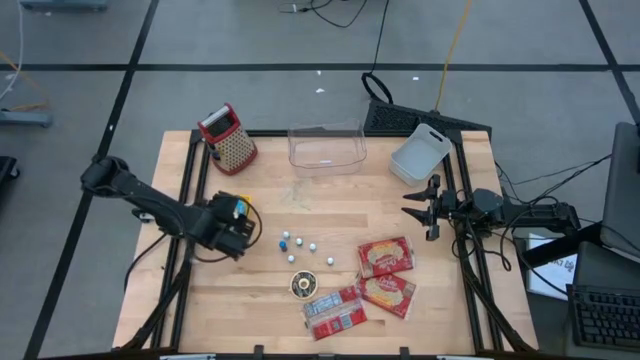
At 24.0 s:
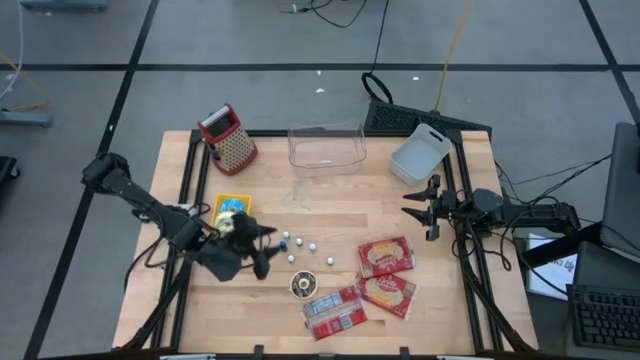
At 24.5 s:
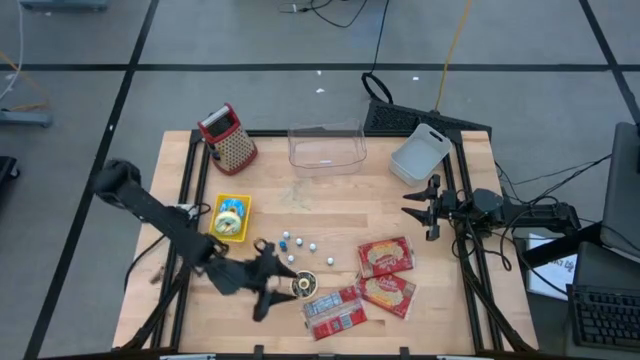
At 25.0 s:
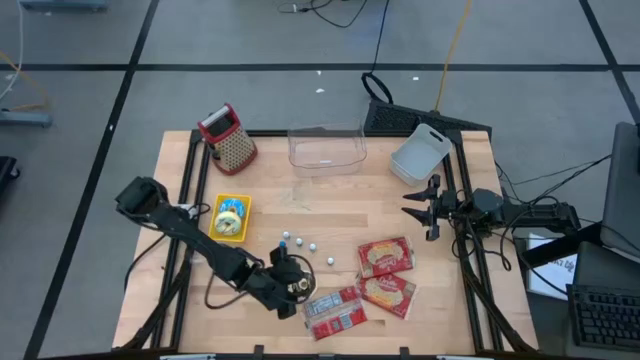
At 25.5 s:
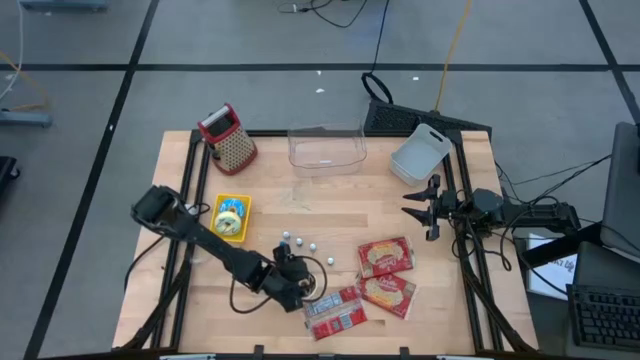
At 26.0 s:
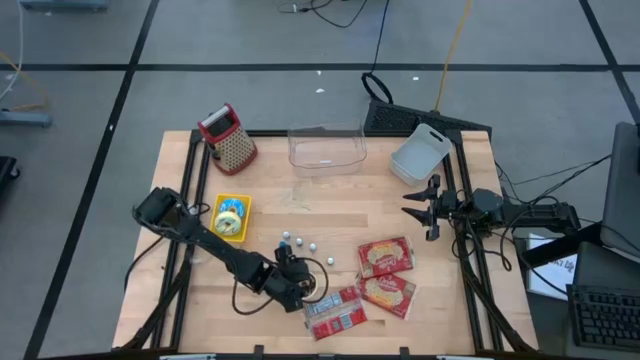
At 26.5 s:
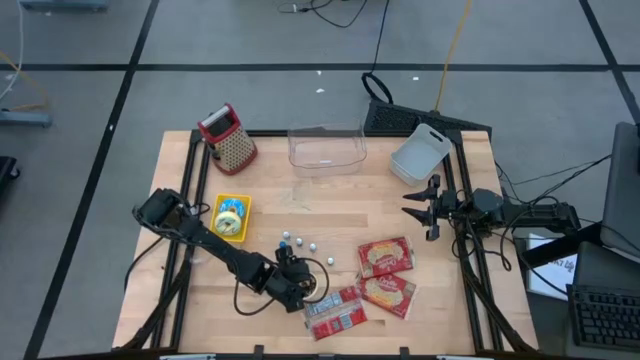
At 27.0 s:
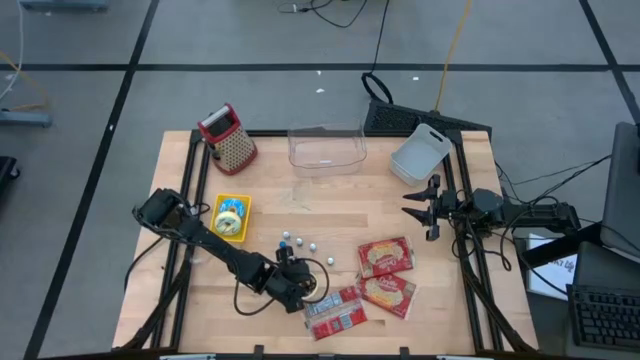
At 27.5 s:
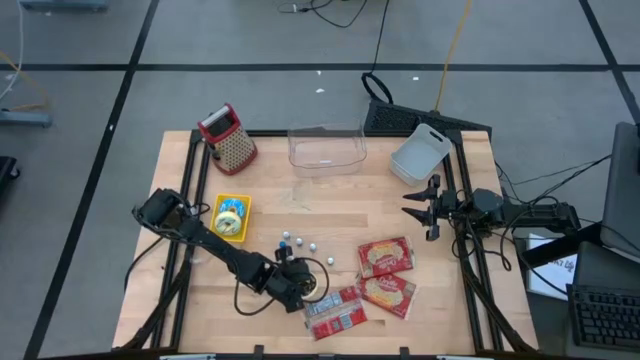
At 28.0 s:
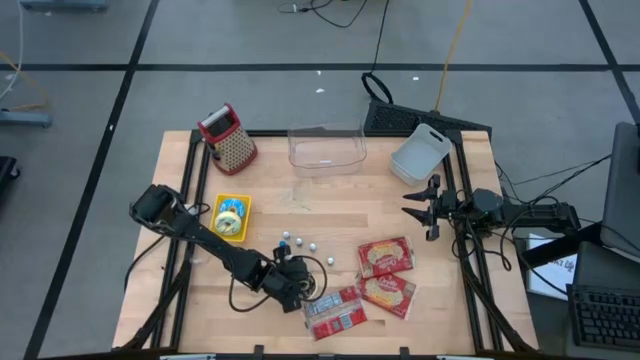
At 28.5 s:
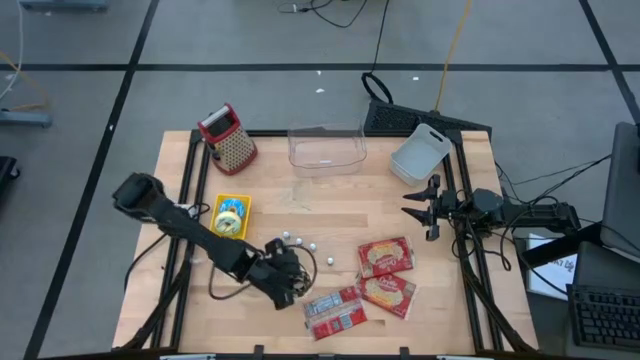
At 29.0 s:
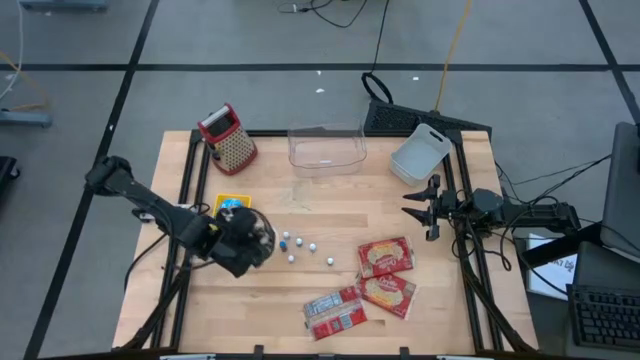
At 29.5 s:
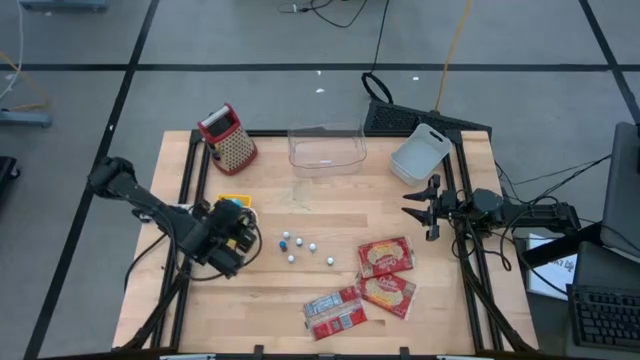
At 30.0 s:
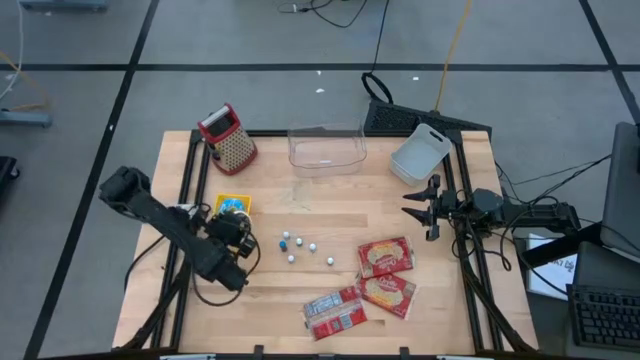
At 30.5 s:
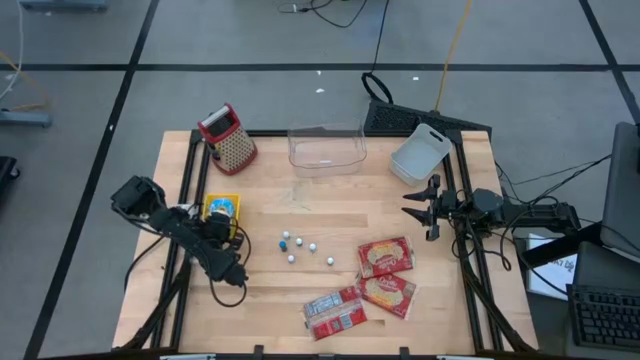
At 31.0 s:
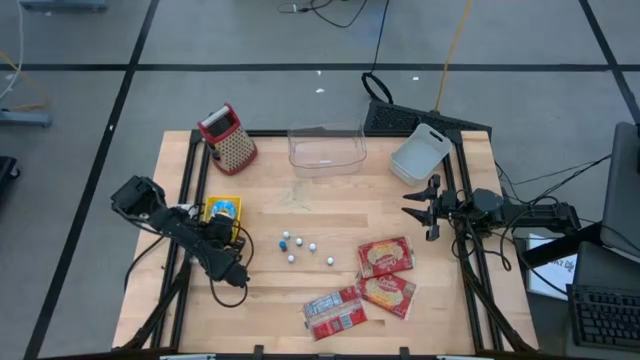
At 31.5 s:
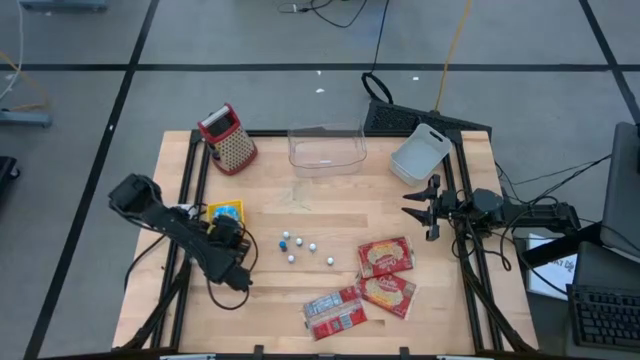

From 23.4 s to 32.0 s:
Put the black donut into the yellow bin

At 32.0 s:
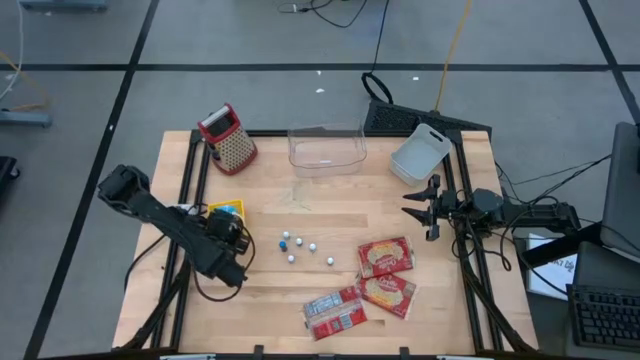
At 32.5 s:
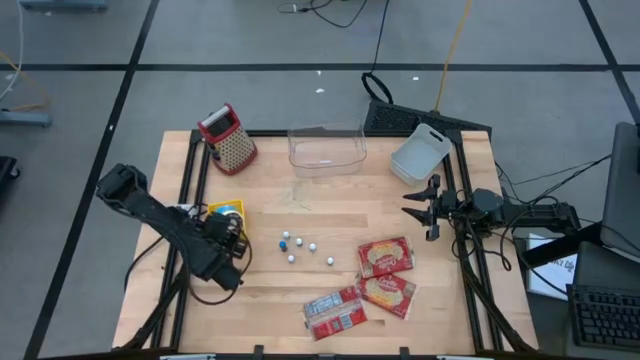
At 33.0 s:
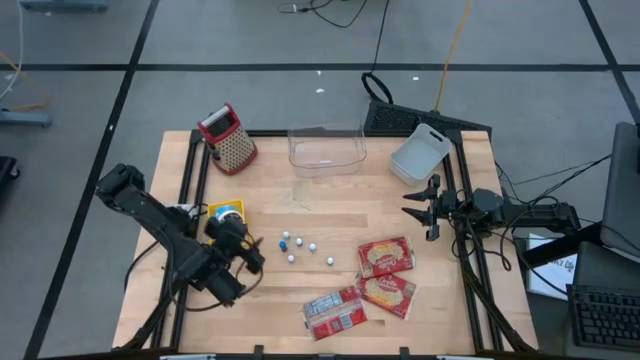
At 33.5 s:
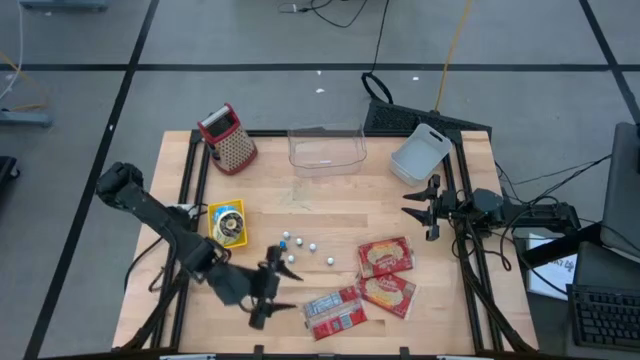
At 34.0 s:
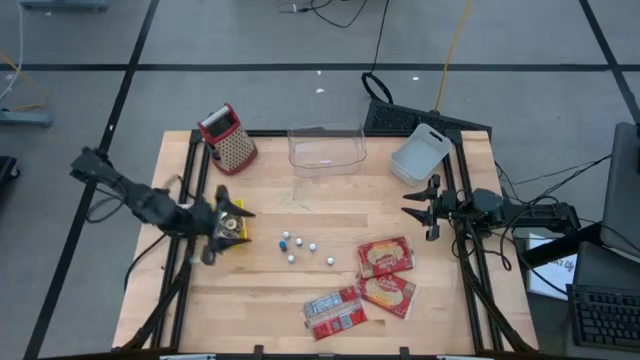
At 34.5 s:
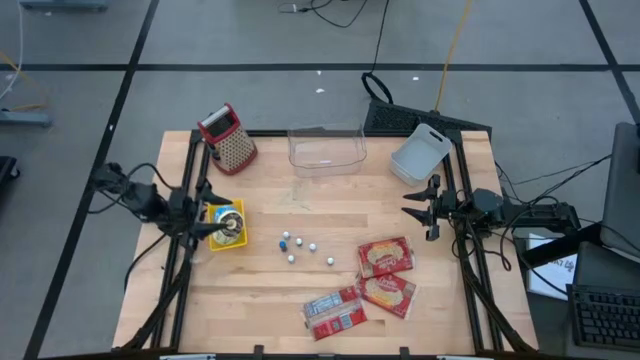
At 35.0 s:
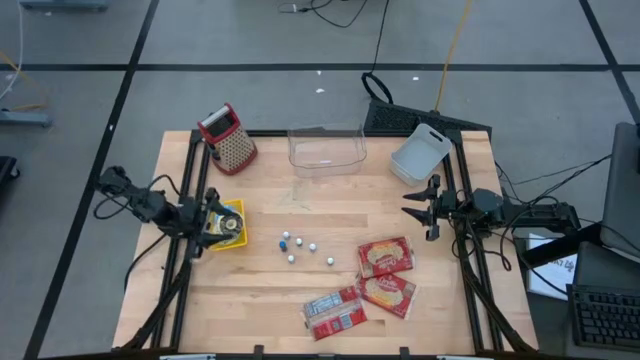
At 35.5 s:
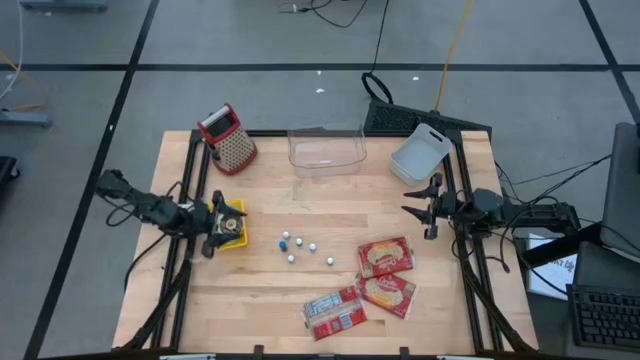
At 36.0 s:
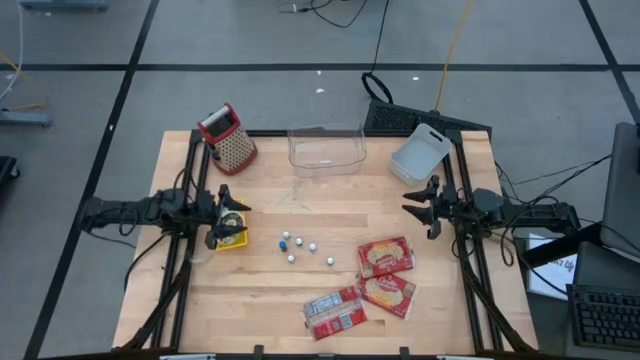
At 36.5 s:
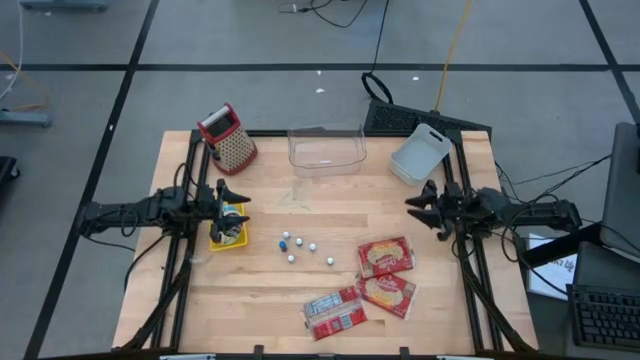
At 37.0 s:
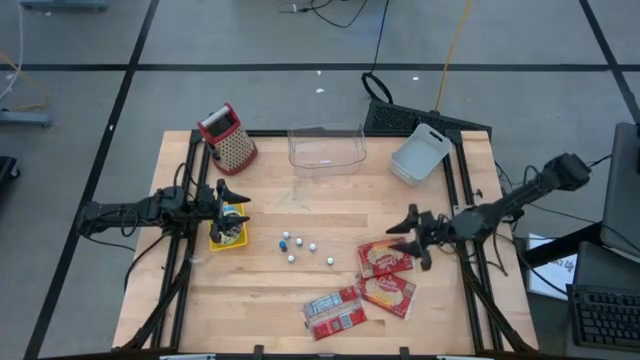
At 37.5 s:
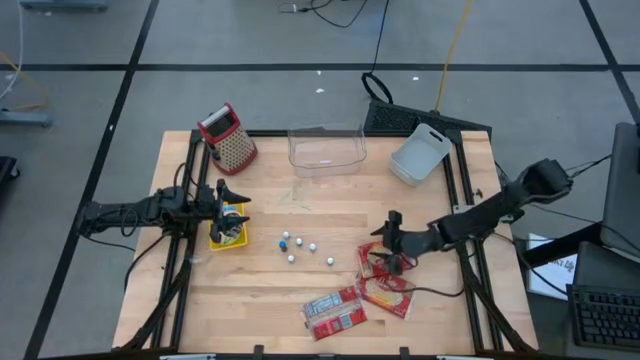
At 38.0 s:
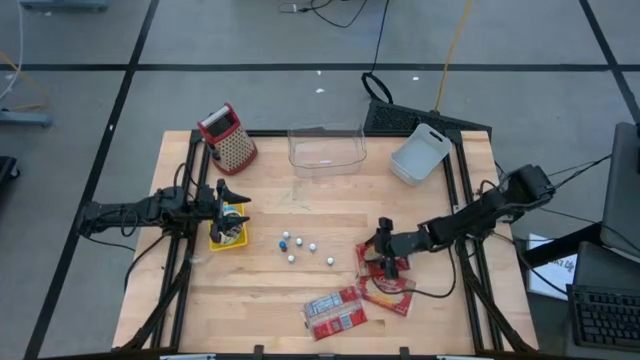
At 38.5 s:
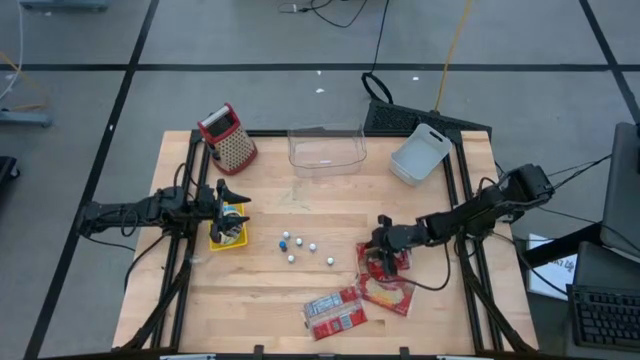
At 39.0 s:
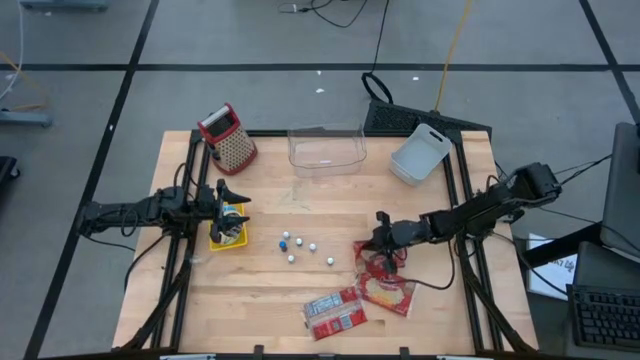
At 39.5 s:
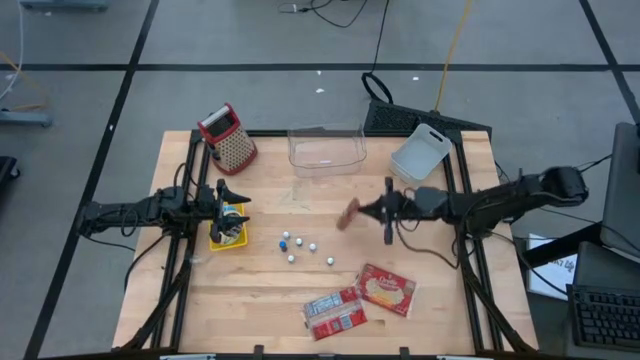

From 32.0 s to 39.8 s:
Put the top popcorn bag into the transparent bin

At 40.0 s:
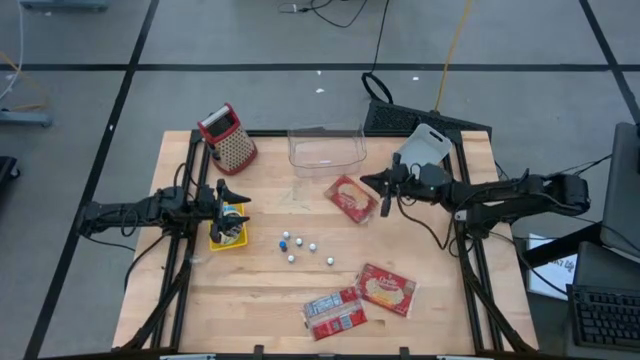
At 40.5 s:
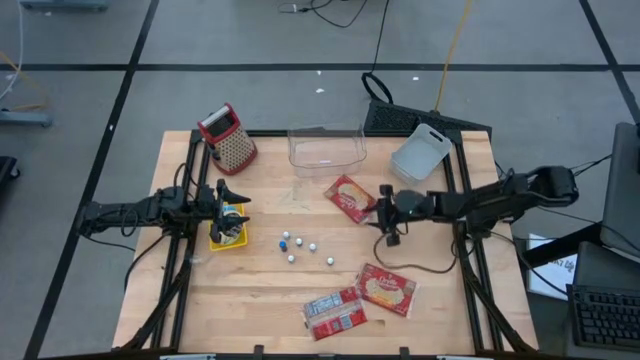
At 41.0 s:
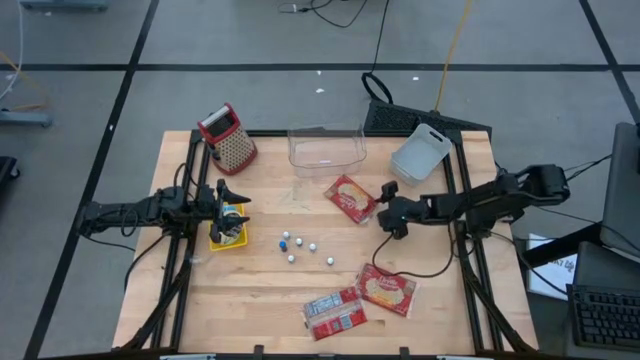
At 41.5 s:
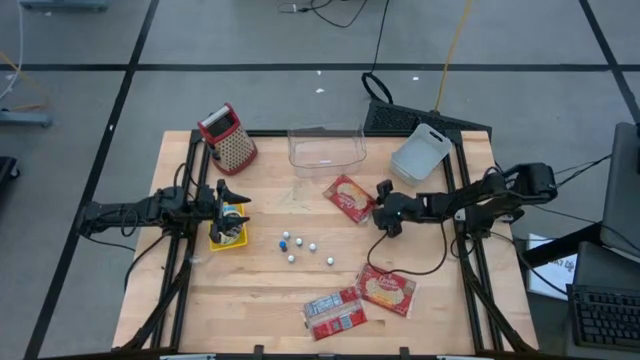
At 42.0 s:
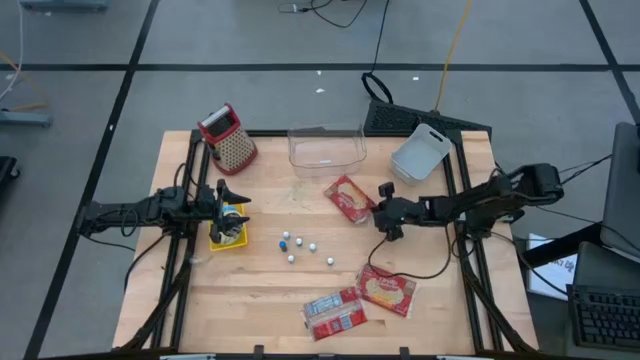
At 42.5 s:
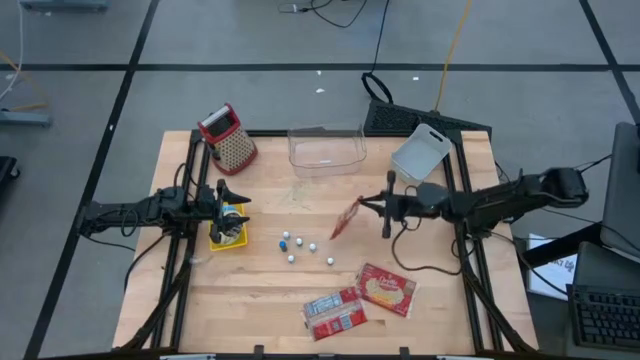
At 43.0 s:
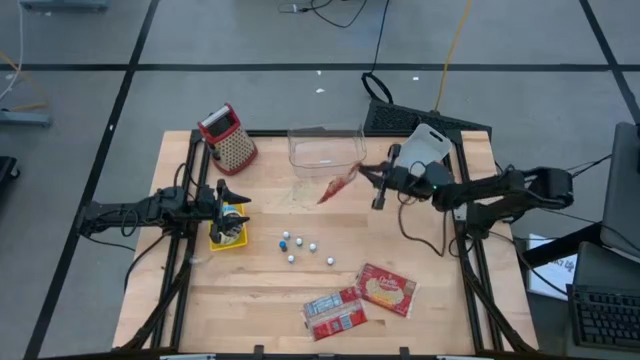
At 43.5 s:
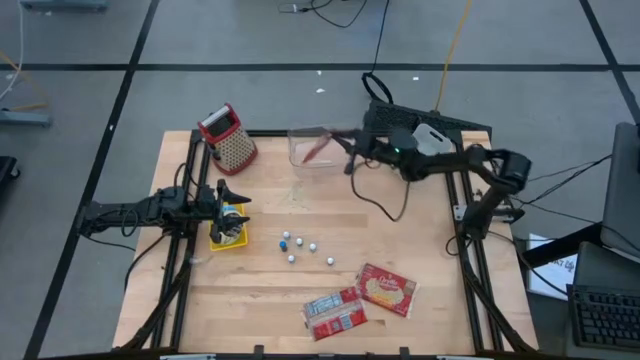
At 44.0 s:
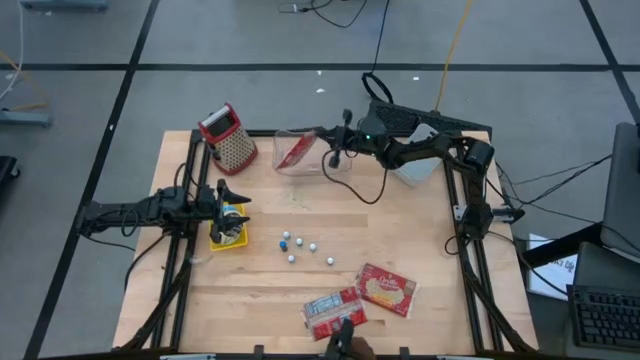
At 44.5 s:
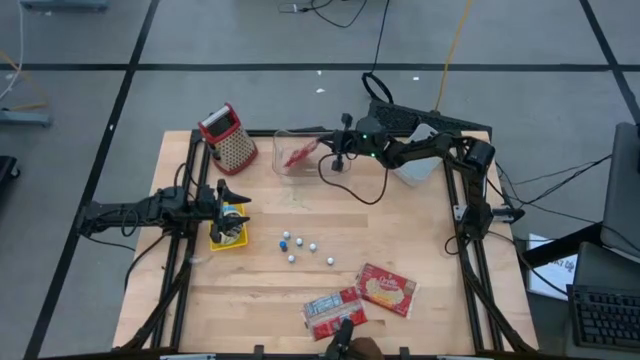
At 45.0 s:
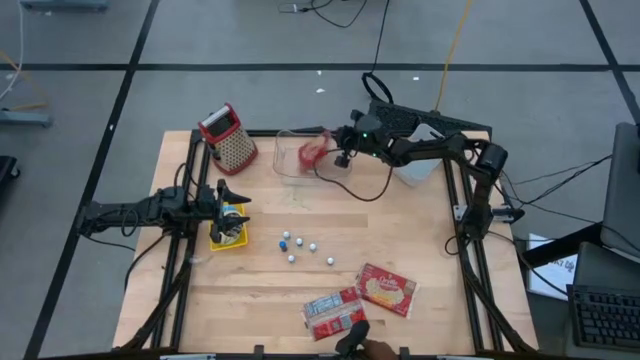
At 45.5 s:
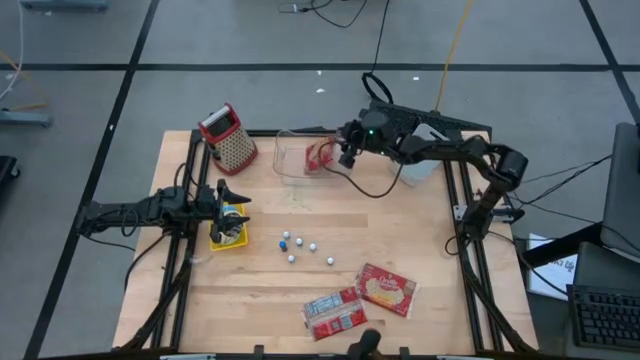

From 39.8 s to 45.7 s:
Put the top popcorn bag into the transparent bin

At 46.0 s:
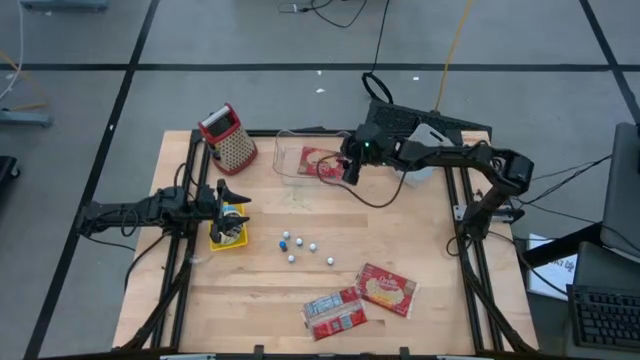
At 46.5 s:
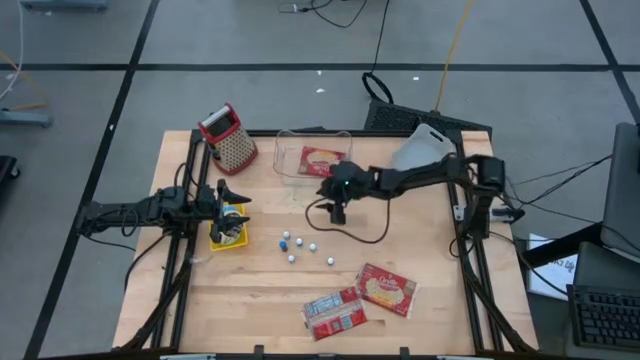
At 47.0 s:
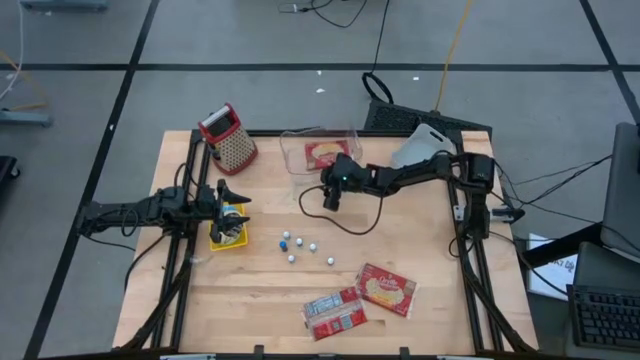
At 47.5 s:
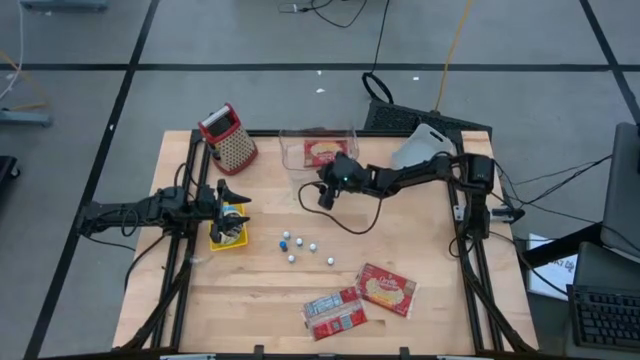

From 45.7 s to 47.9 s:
Adjust the transparent bin
